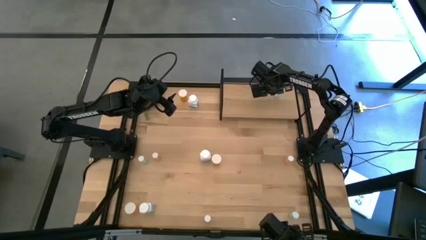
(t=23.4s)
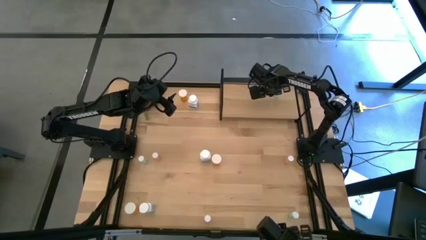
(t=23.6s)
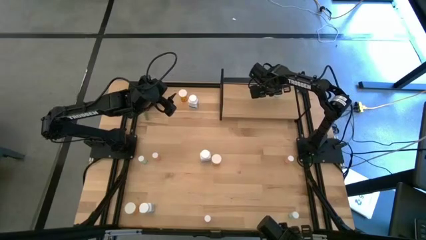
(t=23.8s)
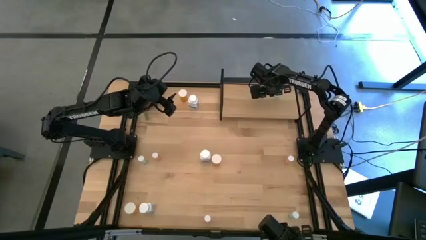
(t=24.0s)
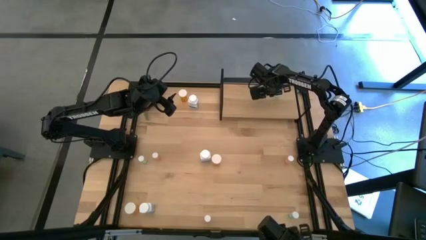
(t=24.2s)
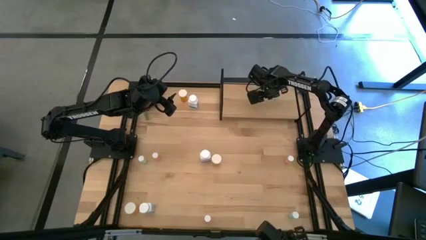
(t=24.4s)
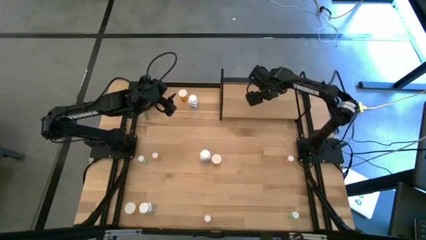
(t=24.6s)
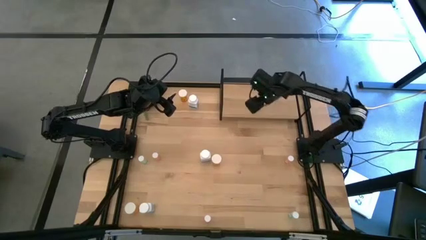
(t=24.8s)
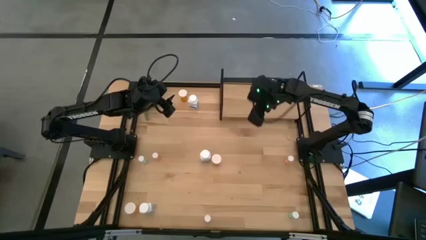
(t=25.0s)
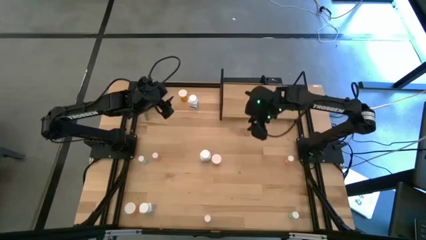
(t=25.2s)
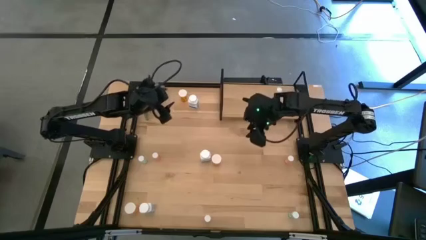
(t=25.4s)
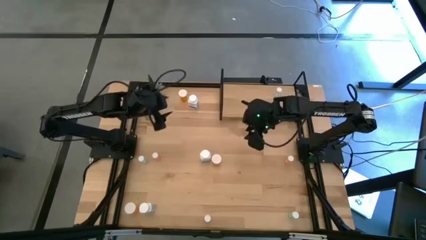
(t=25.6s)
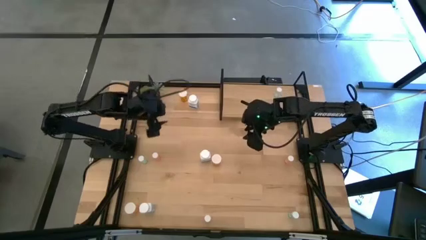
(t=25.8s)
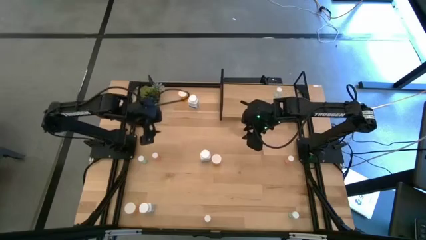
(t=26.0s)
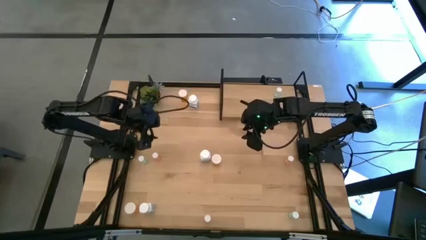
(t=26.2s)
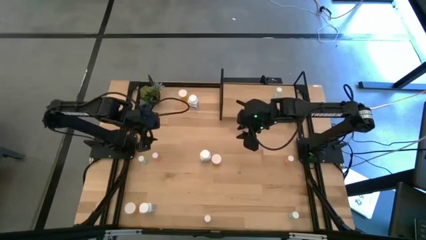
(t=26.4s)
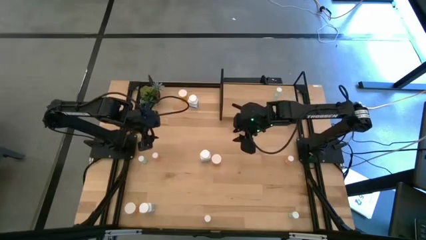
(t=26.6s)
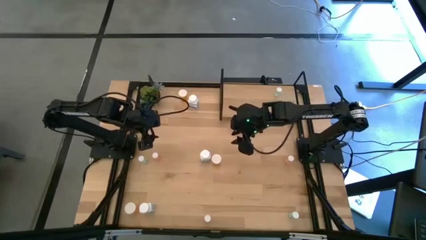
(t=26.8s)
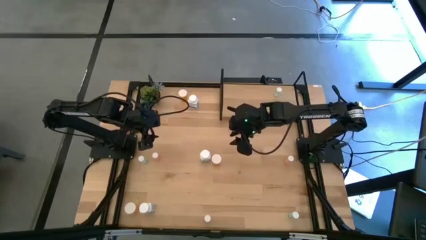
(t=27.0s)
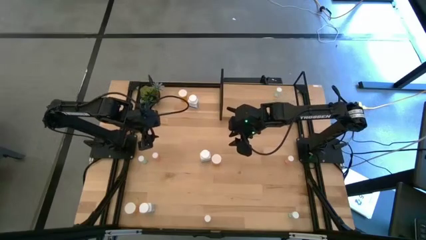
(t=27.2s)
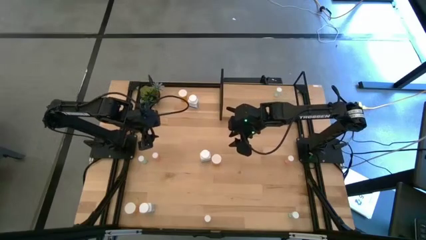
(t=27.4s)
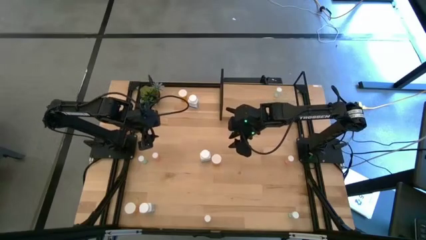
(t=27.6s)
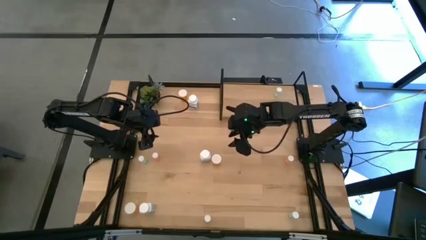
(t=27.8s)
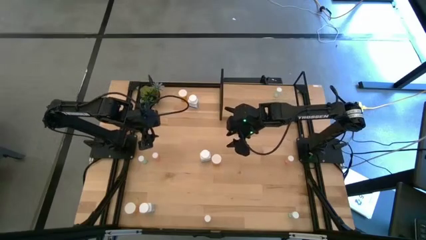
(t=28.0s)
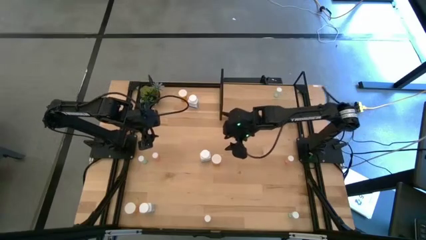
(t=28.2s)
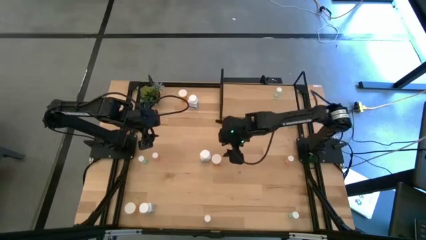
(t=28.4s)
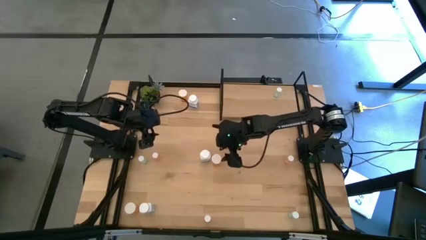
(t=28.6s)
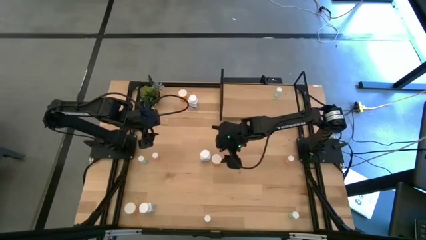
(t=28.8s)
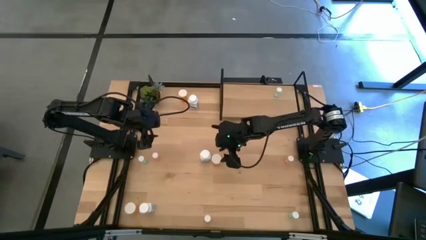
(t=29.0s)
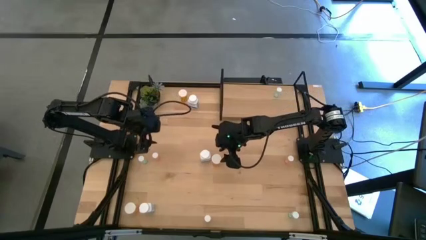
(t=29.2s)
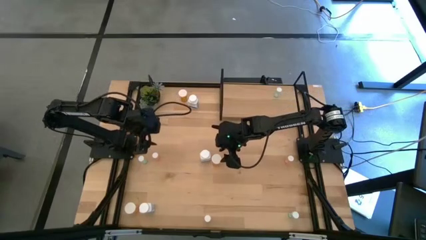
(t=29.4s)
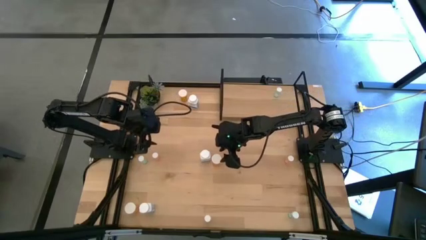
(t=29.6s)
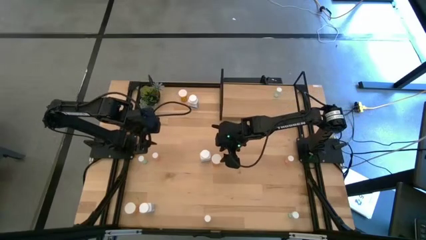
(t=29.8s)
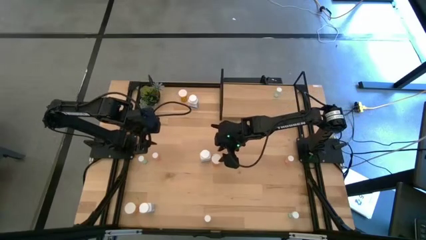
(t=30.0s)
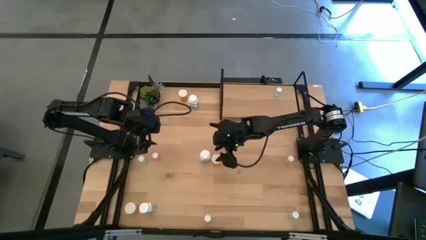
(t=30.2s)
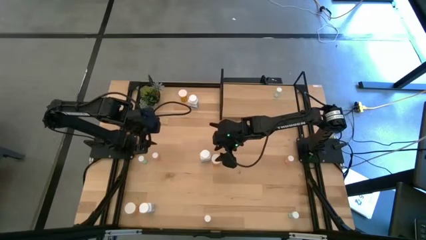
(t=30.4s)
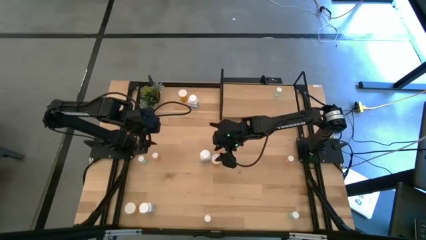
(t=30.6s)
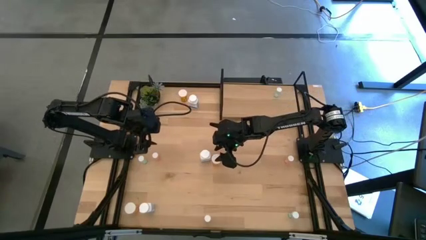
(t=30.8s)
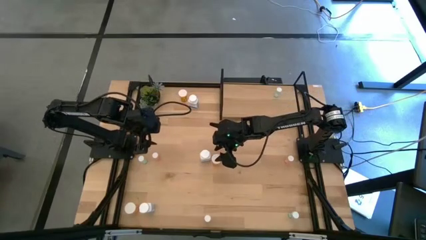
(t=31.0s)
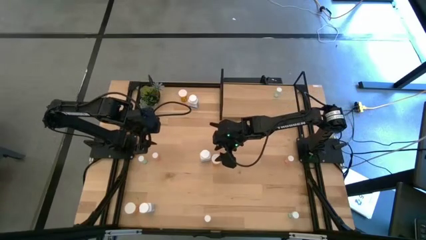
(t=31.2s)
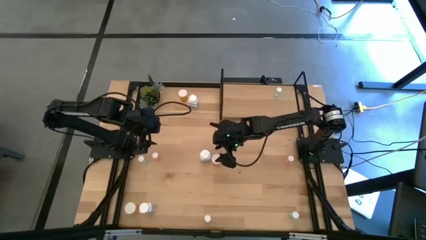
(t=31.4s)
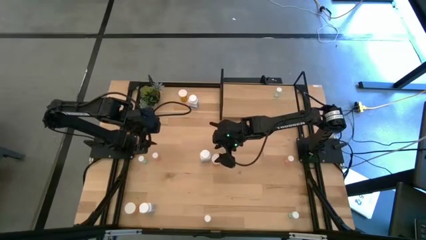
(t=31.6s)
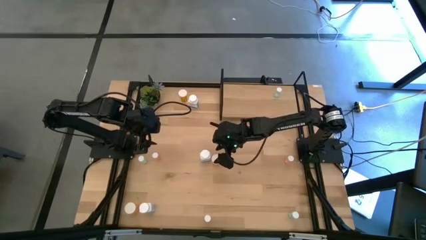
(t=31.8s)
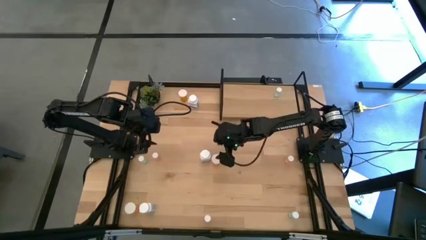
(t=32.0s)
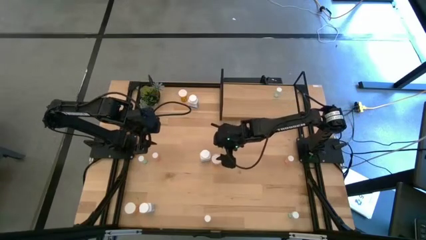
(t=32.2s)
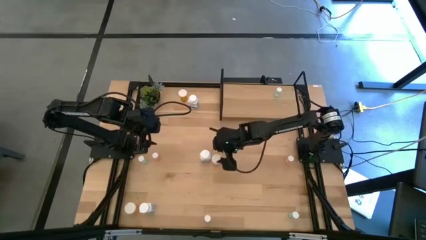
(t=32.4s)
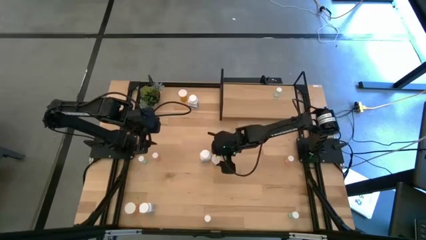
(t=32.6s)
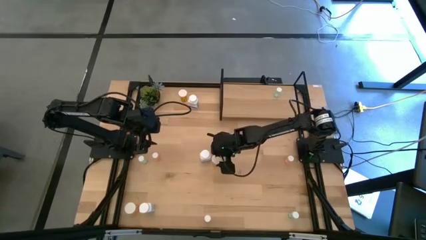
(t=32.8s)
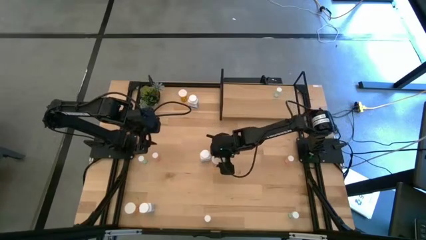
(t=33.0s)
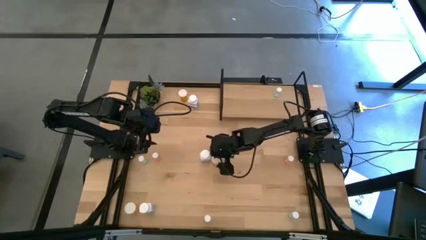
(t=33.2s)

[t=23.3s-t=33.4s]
Task: Pick and place medicine bottles onto shelf by color
Put the middle orange pill bottle on the shelf
